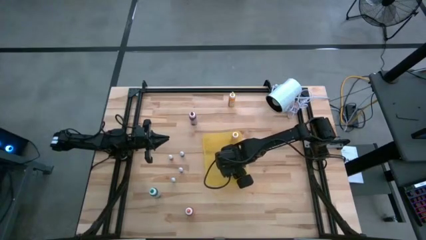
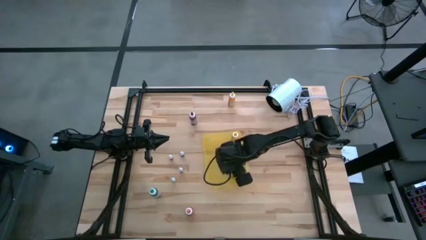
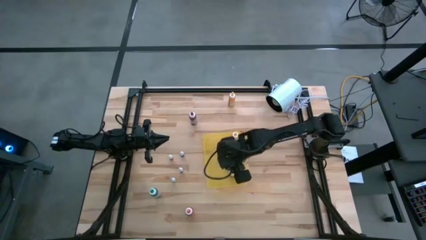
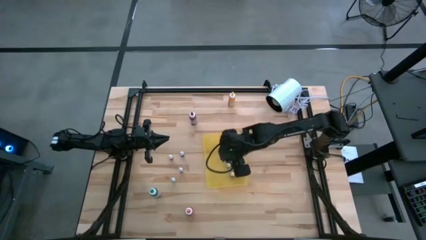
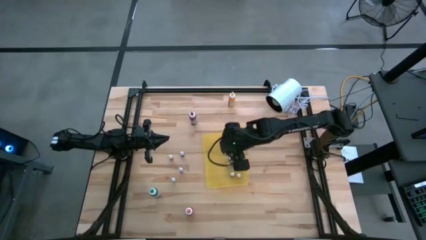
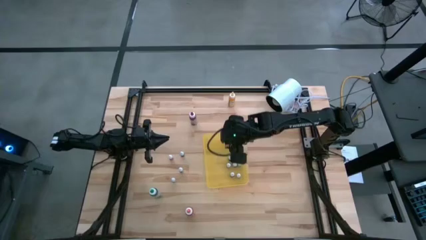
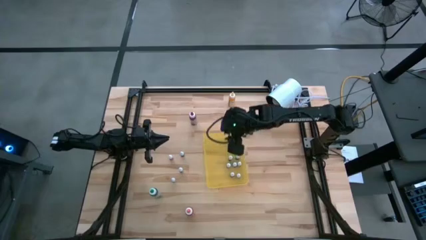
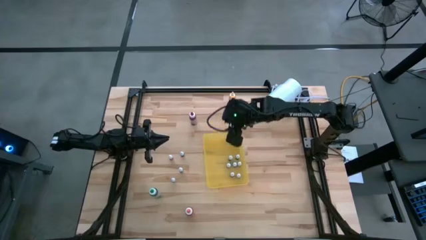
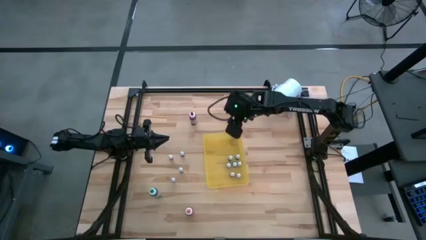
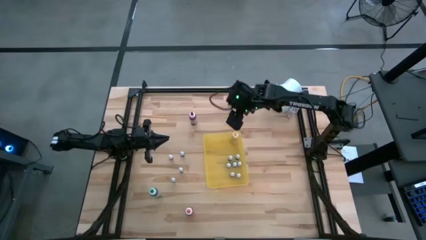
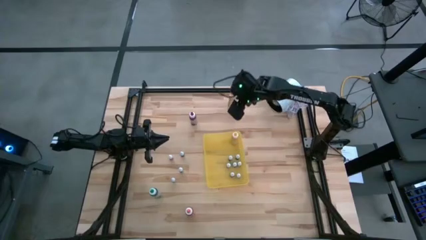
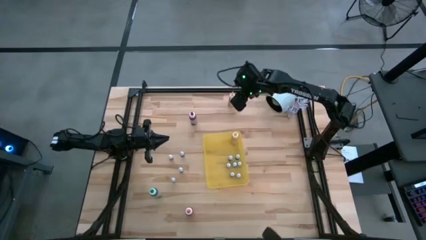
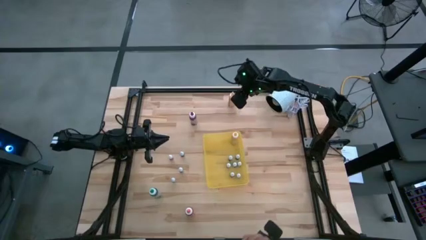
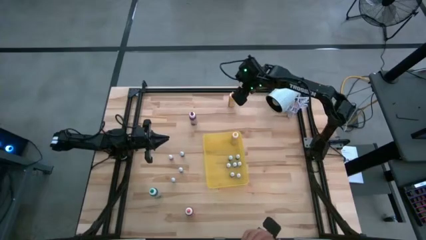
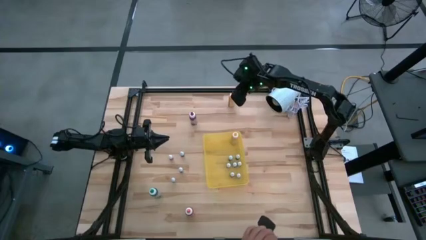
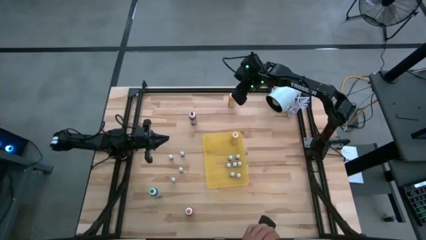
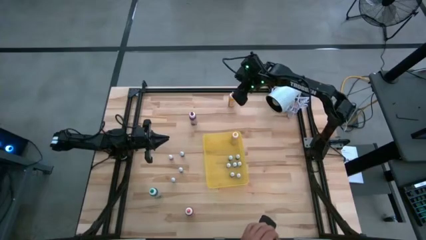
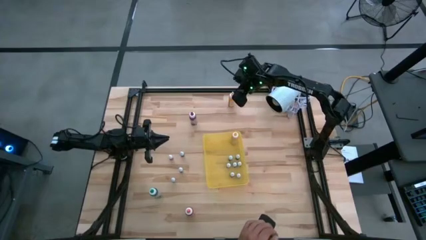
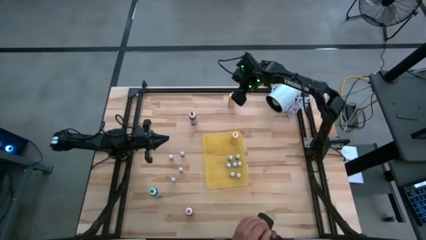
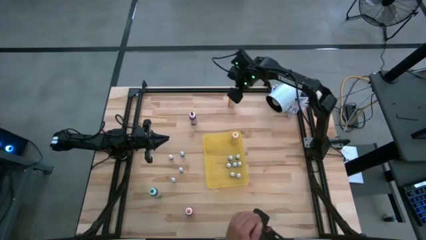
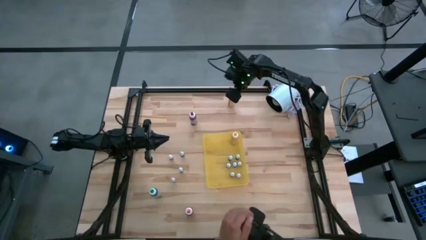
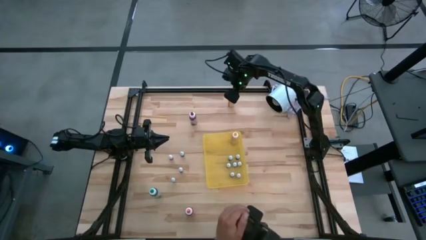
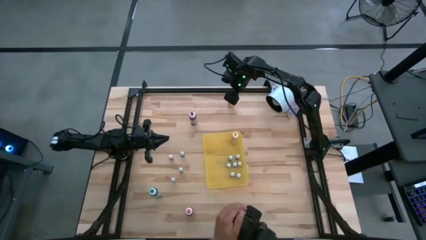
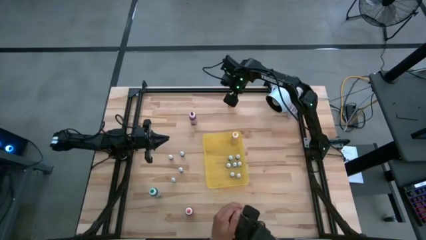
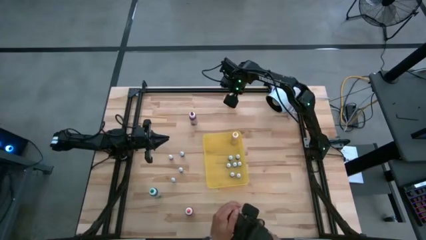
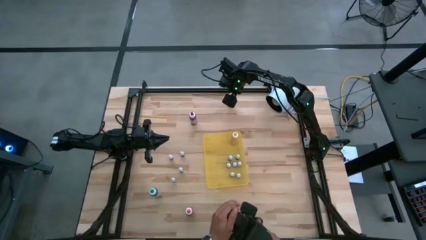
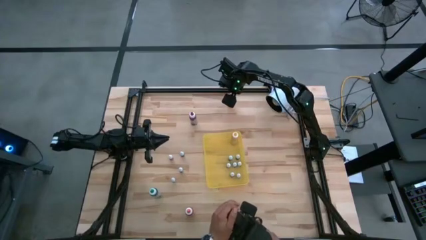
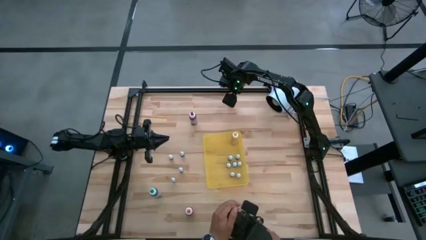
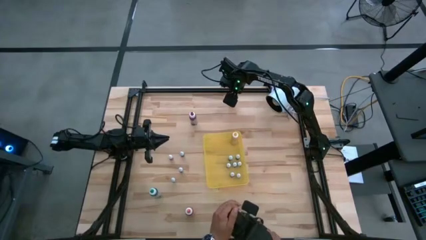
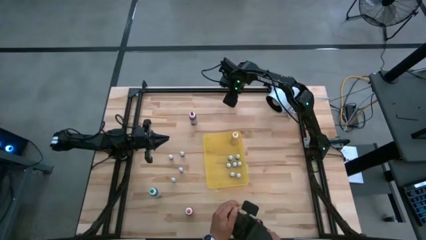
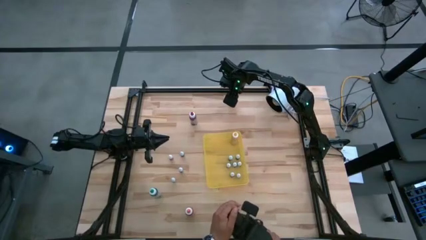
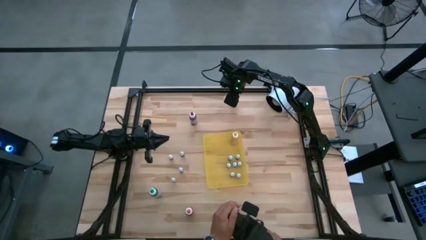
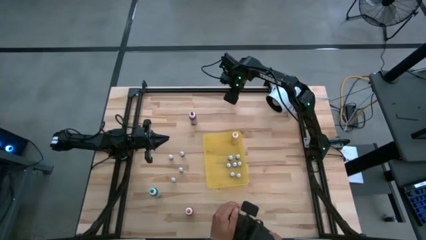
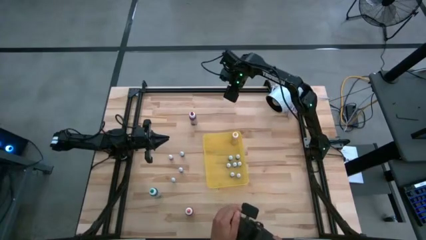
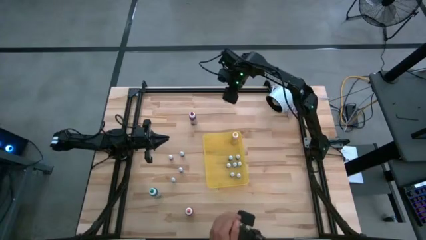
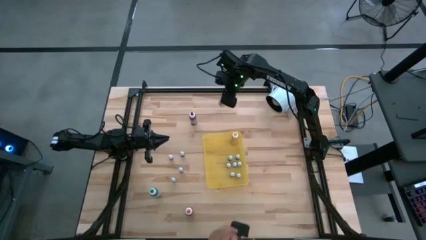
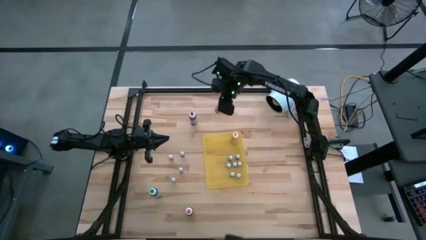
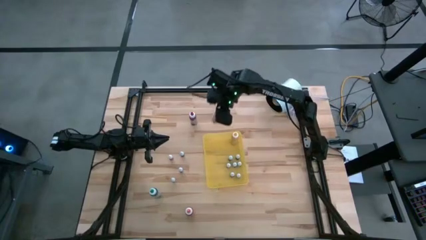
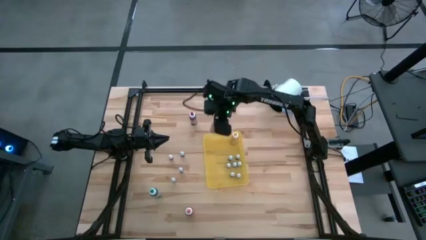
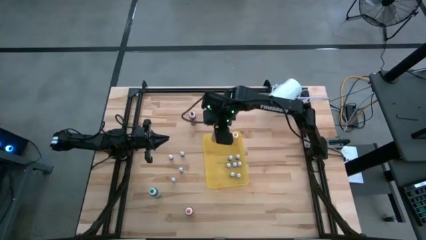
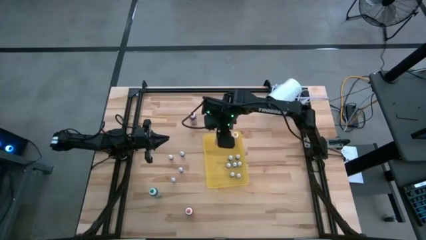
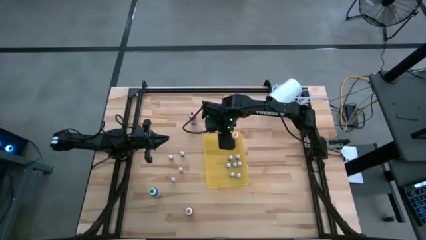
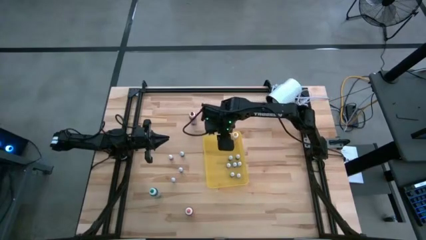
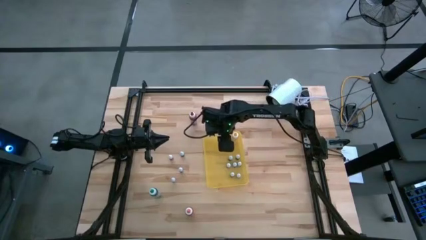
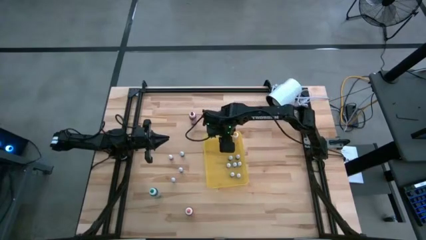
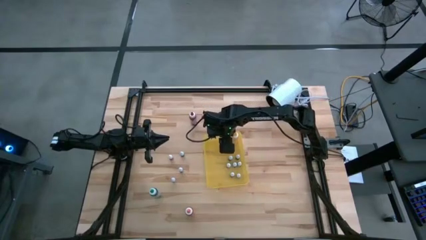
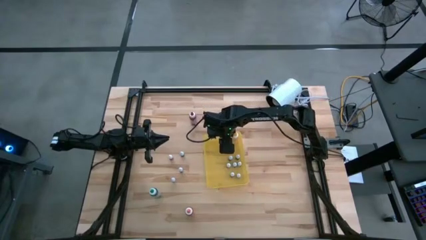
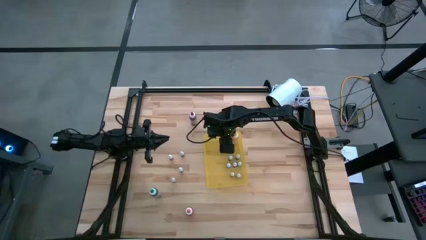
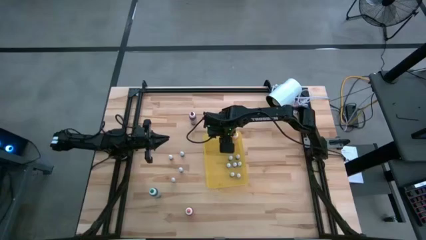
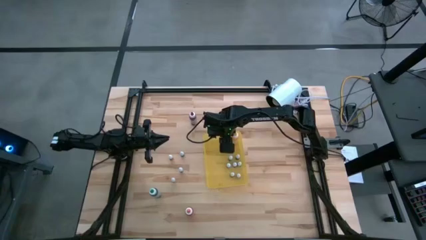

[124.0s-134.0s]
Task: Pick & Place food coloring
Put the large yellow food coloring bottle into the yellow bin
